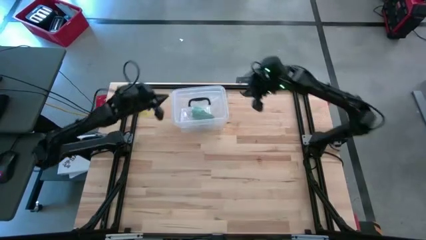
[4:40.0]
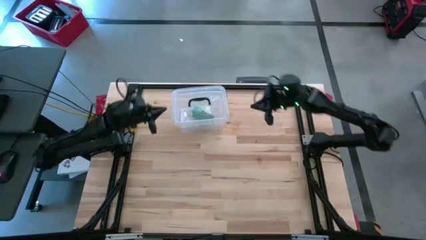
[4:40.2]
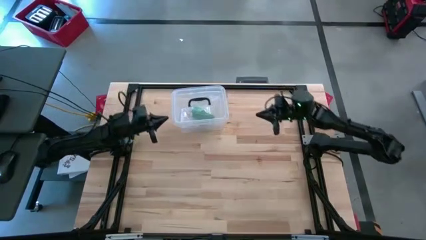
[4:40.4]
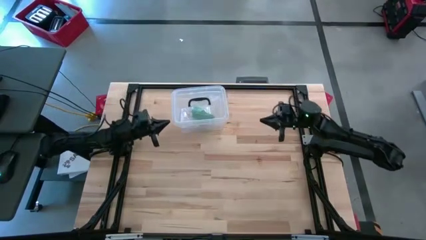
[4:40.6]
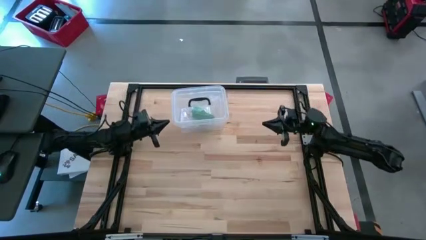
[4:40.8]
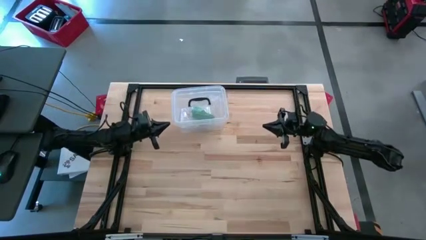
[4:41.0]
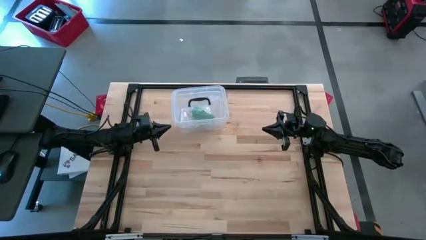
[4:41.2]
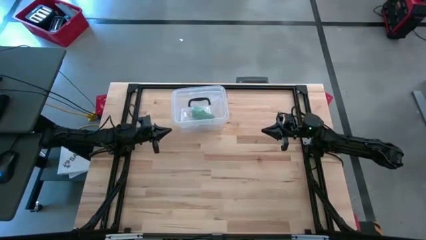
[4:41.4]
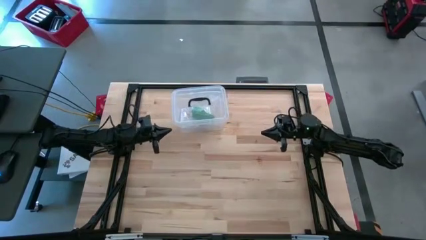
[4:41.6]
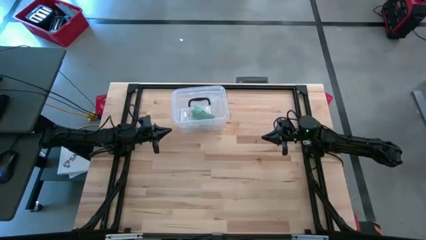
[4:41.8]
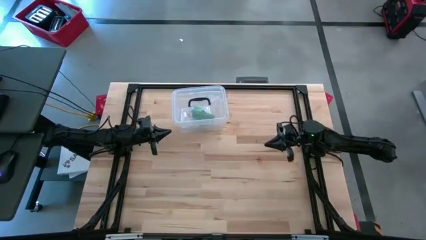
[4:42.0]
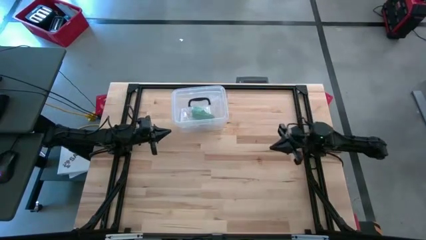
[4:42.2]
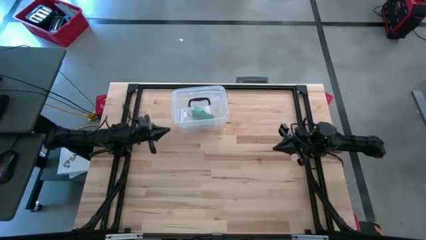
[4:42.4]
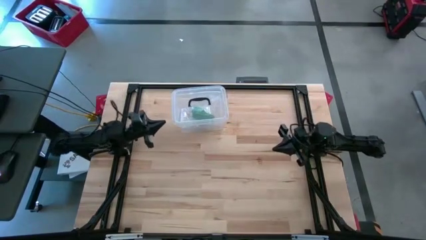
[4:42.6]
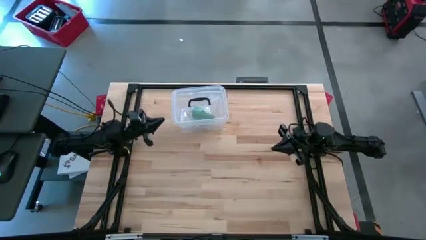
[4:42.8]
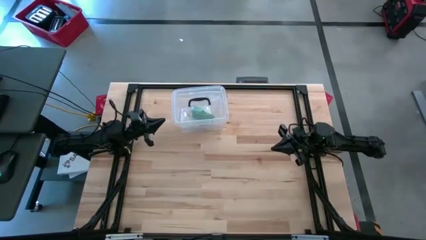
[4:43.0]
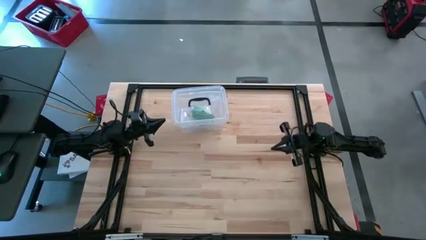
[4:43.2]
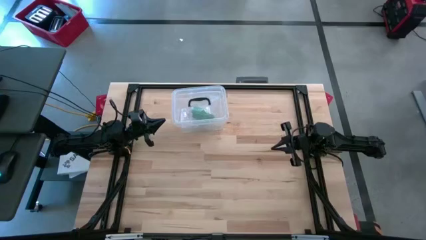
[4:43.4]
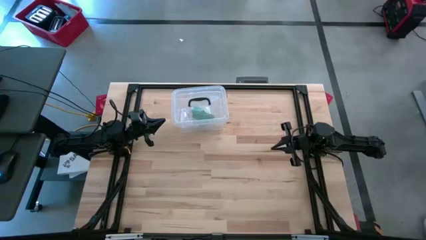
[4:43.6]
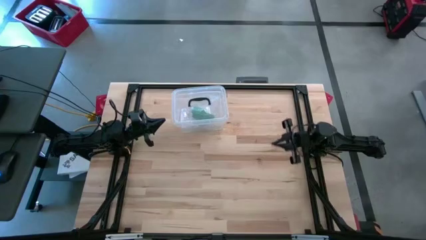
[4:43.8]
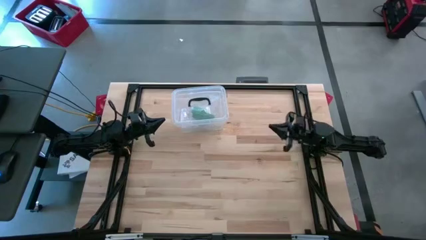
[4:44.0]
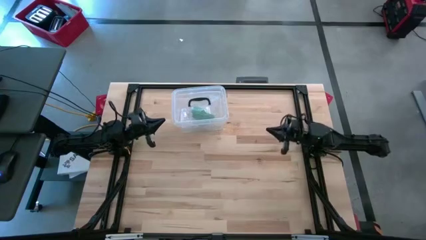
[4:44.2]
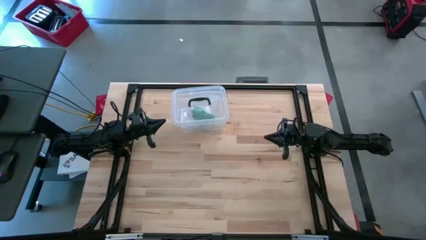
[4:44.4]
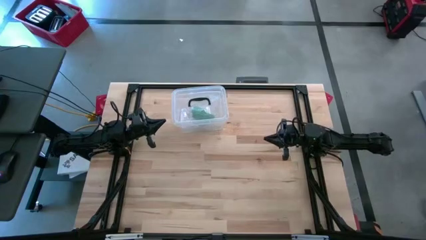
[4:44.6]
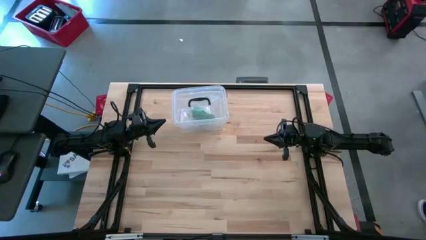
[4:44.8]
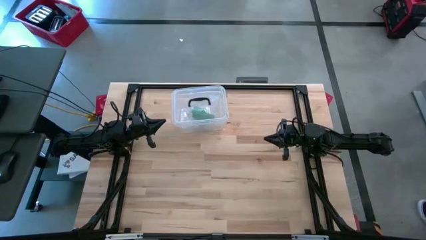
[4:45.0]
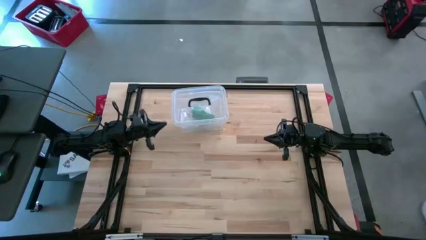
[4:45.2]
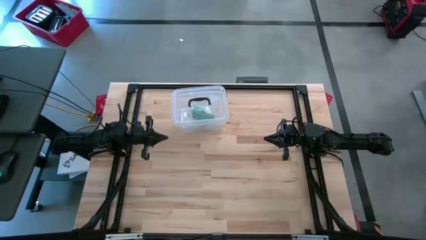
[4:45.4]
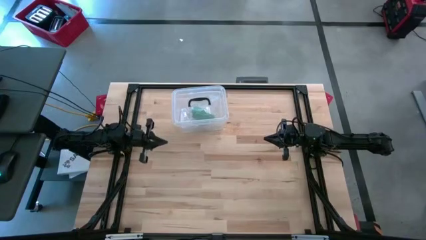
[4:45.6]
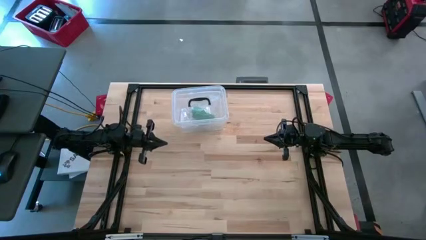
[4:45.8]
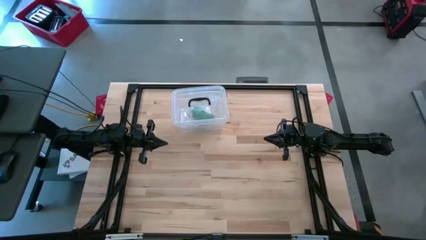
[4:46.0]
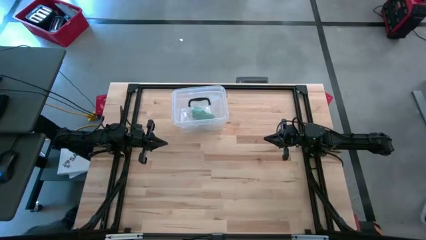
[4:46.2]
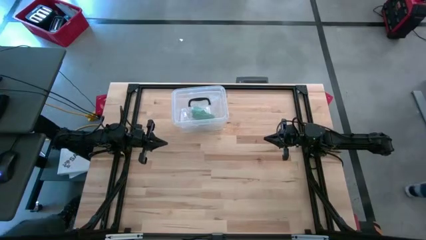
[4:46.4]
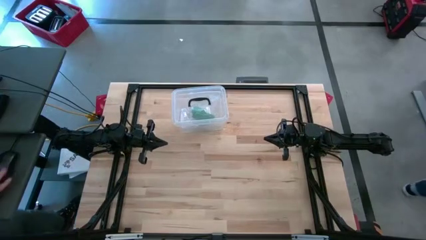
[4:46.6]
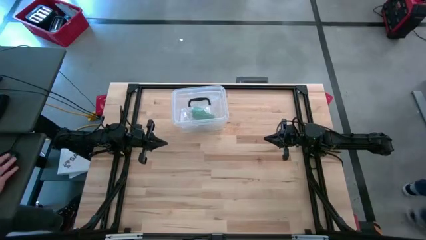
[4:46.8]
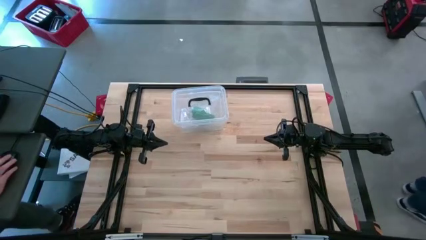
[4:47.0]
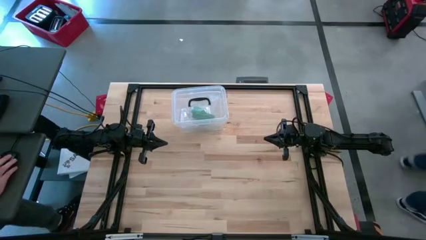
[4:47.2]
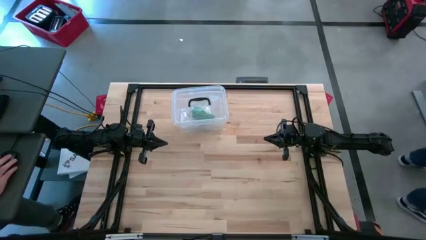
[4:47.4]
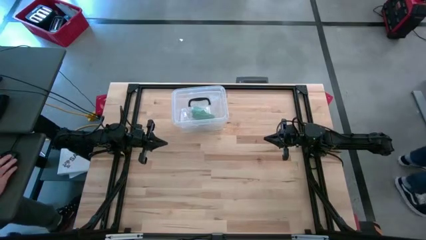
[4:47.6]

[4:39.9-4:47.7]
Task: Roll bandage
Return to Home Position

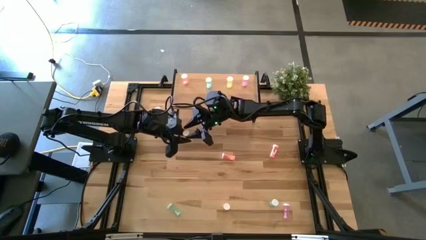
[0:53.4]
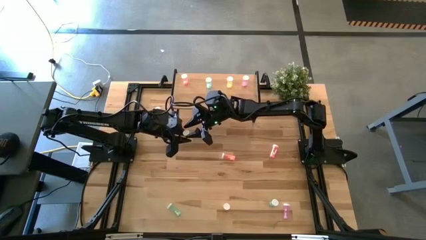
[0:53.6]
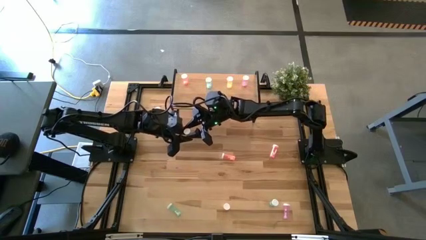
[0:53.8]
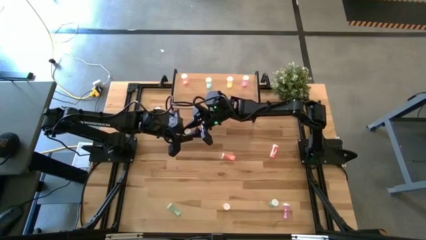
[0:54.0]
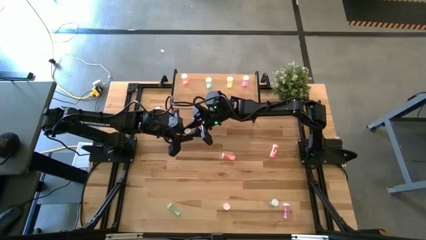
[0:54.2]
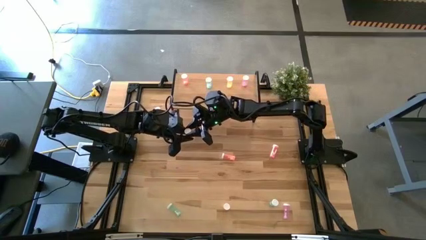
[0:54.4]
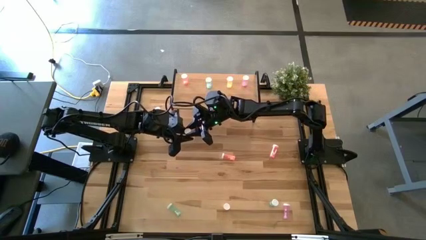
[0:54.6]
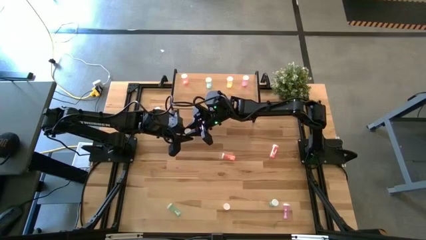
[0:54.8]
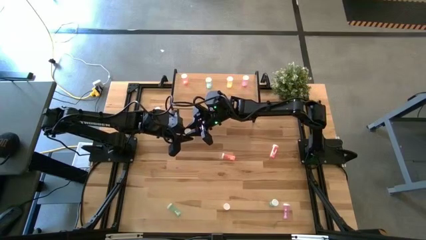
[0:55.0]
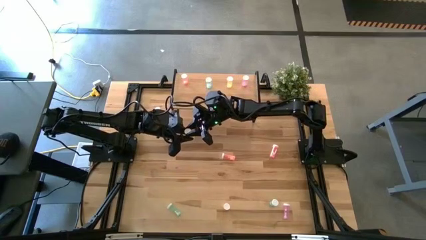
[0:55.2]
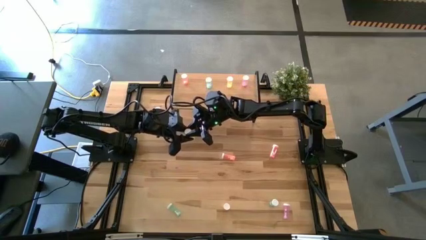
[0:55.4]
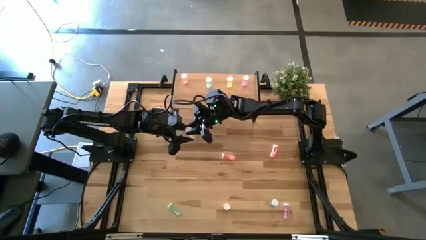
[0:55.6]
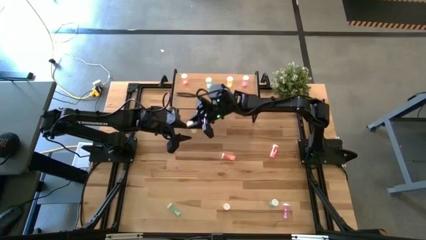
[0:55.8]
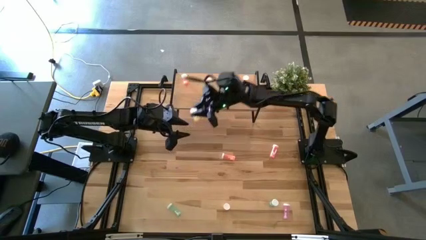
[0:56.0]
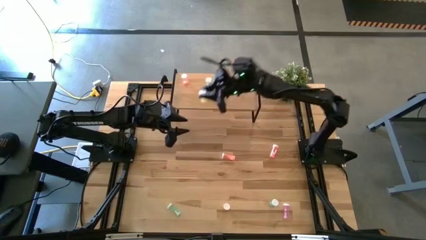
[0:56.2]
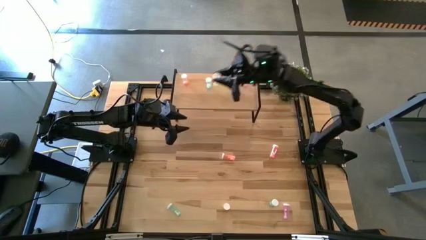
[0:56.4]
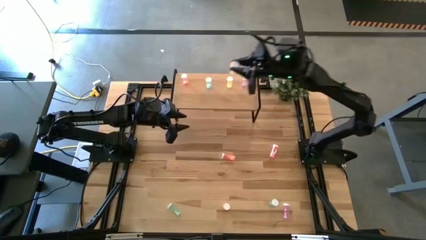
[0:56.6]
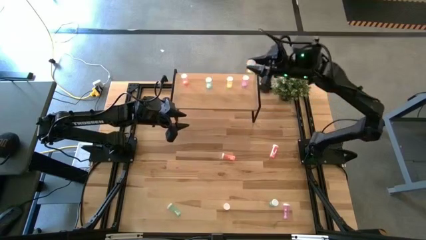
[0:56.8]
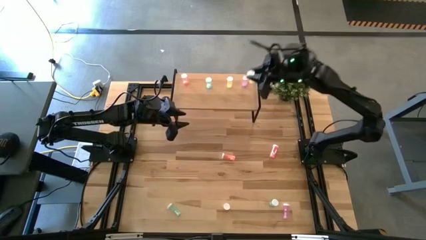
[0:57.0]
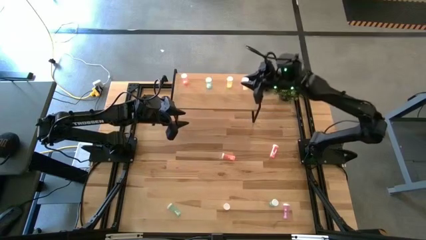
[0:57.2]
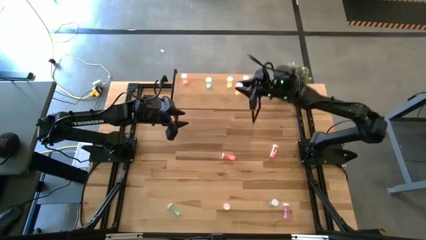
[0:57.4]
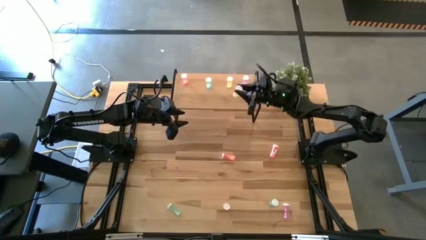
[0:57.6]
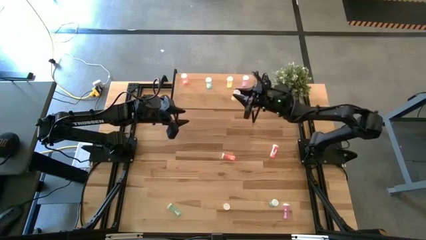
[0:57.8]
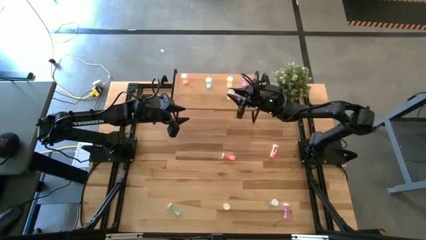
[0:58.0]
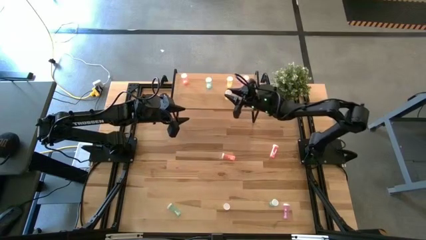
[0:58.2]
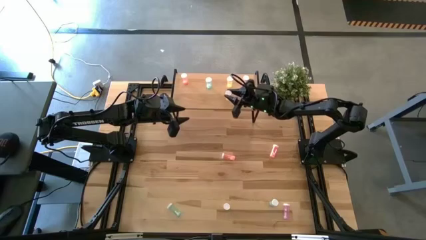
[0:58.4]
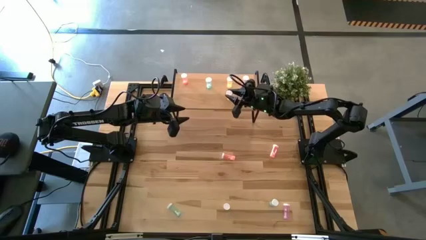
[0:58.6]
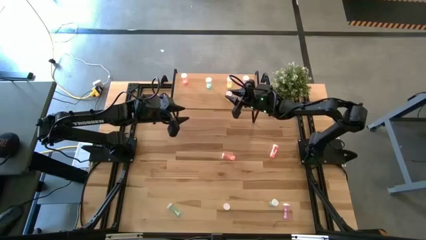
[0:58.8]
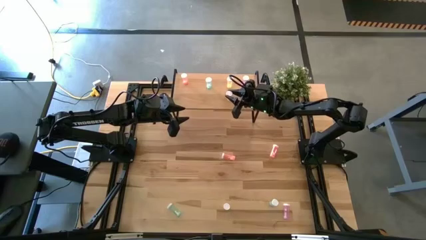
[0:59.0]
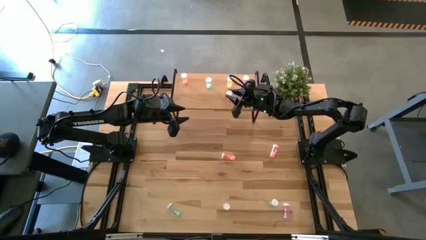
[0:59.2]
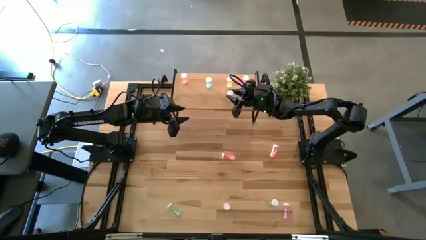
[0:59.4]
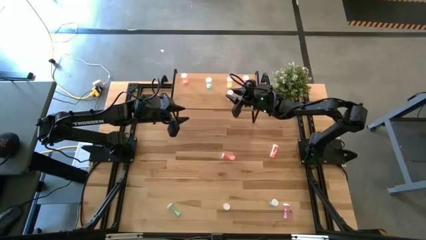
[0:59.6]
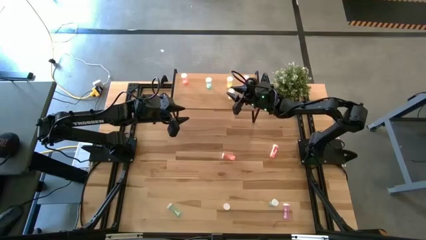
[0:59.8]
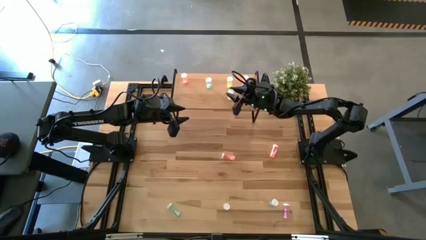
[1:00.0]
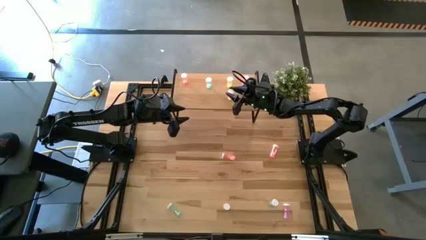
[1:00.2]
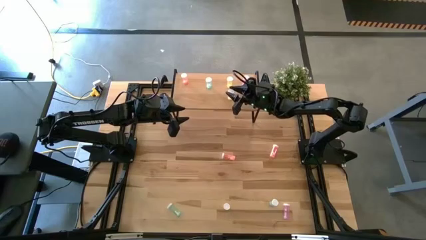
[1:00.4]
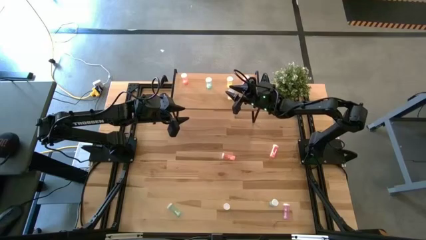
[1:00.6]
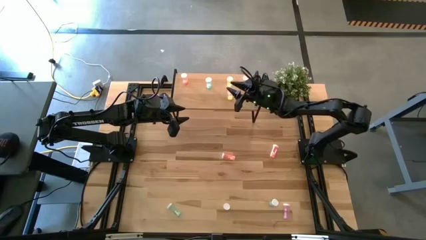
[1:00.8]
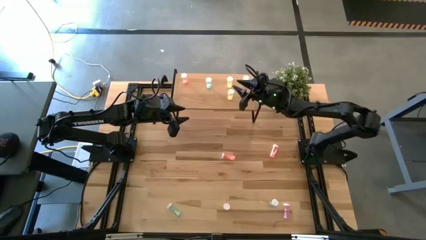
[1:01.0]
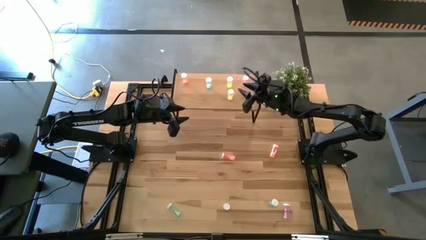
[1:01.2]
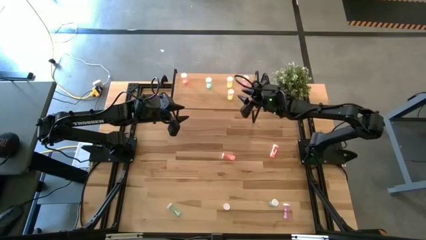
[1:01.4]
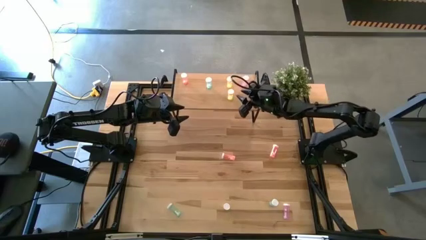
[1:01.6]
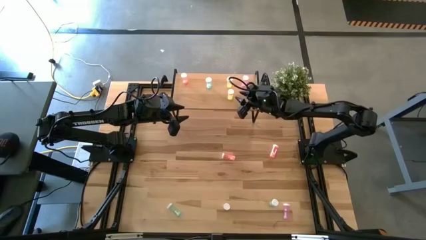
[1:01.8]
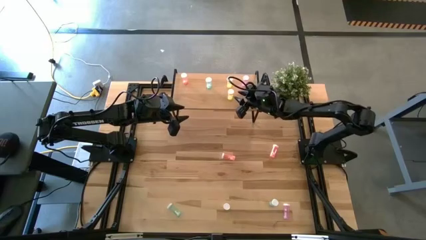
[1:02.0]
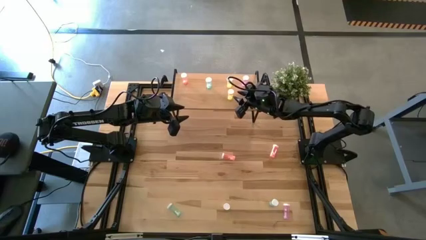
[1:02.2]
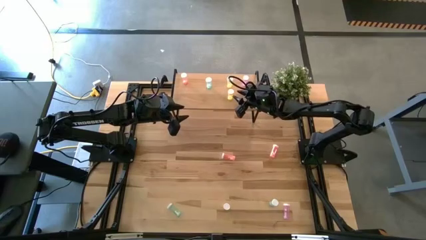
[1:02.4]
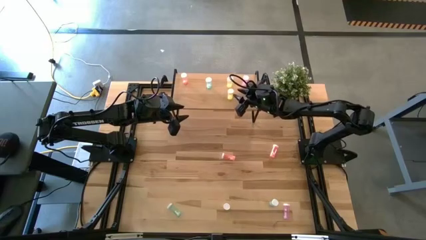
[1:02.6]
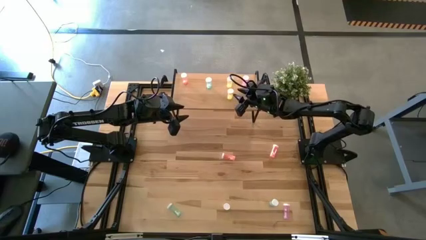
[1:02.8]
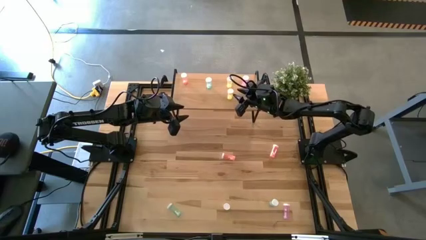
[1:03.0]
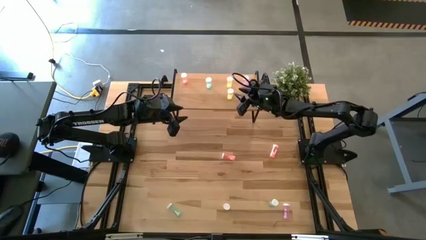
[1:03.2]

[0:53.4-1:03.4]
Task: Pick and place medicine bottles onto shelf by color
Put the left yellow pill bottle on the shelf aligned with the other yellow pill bottle
